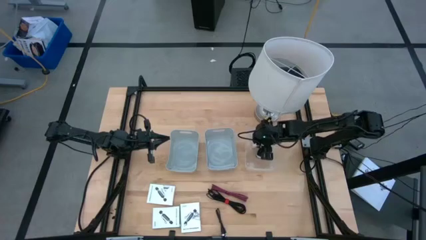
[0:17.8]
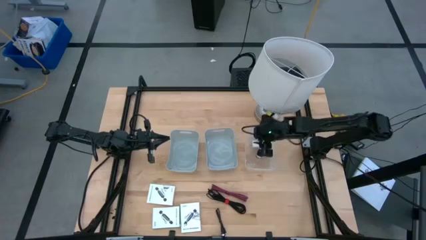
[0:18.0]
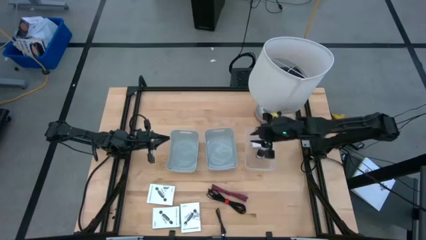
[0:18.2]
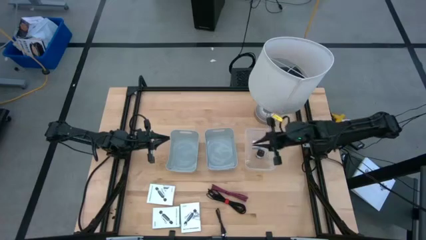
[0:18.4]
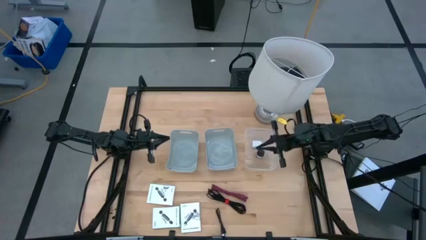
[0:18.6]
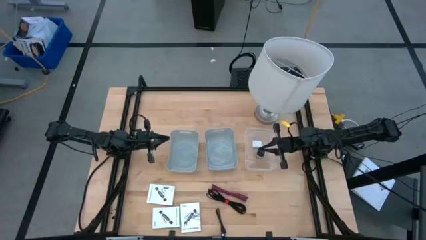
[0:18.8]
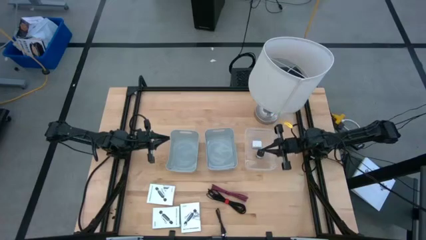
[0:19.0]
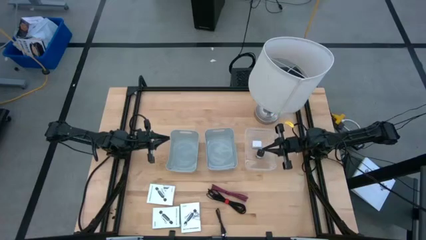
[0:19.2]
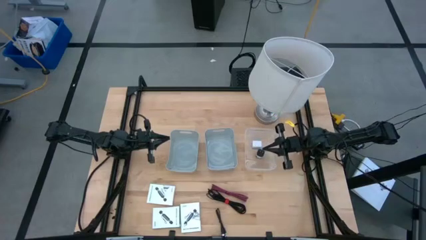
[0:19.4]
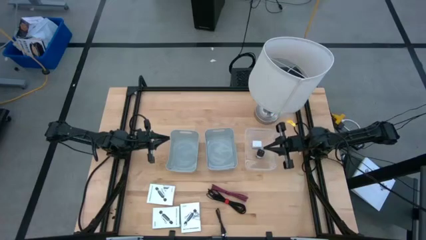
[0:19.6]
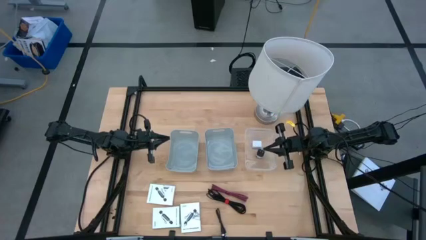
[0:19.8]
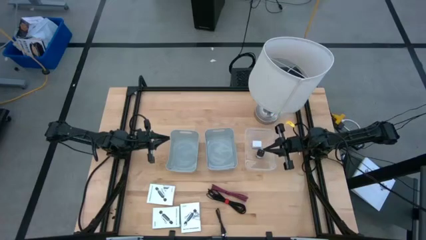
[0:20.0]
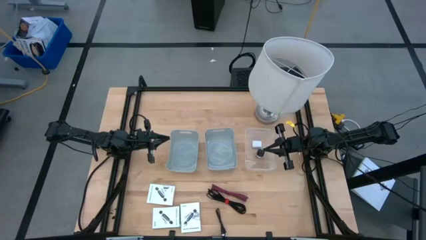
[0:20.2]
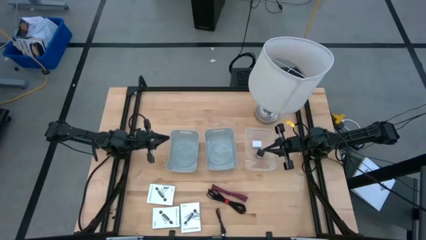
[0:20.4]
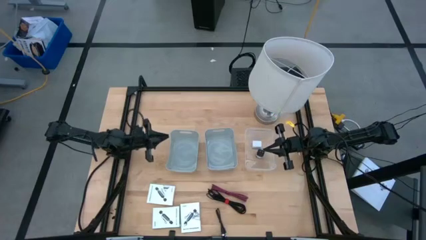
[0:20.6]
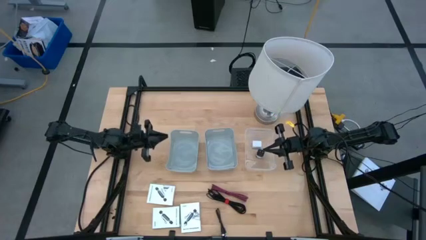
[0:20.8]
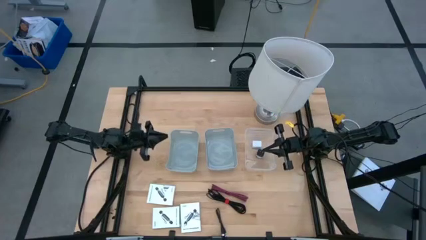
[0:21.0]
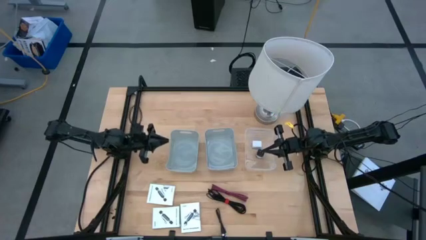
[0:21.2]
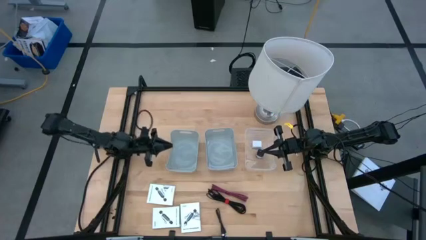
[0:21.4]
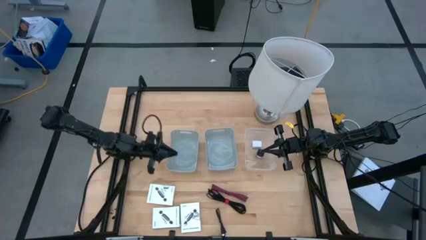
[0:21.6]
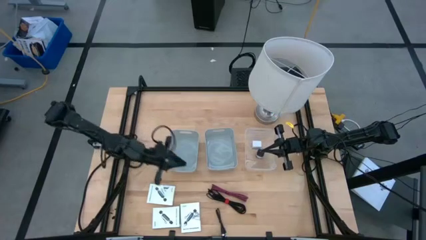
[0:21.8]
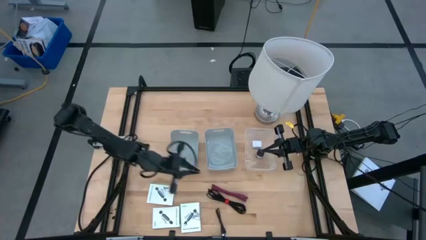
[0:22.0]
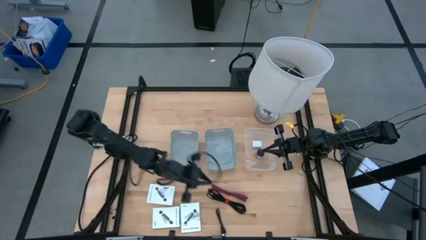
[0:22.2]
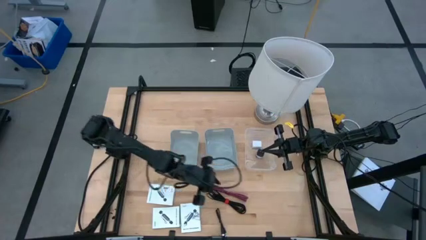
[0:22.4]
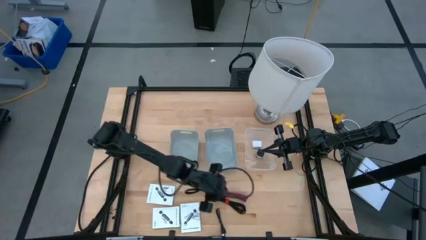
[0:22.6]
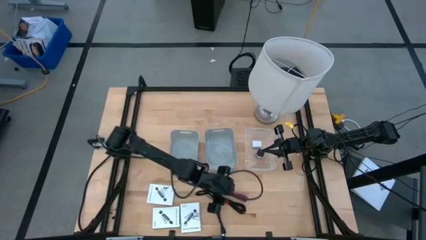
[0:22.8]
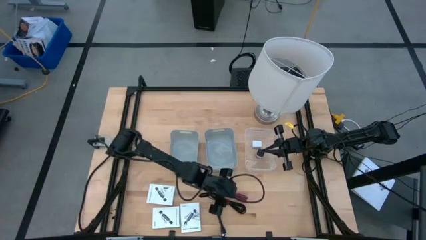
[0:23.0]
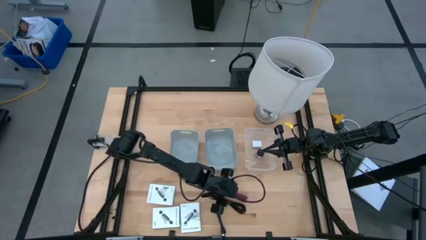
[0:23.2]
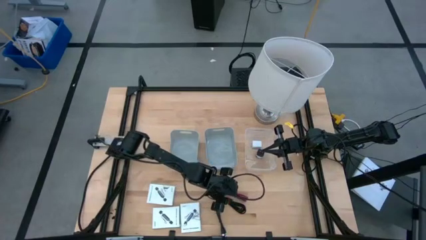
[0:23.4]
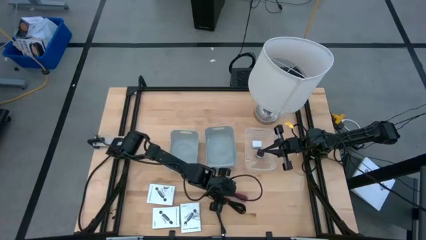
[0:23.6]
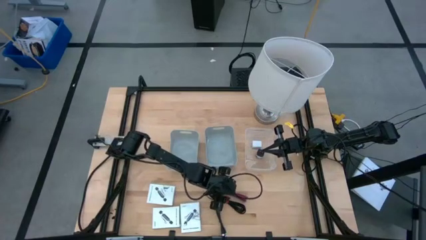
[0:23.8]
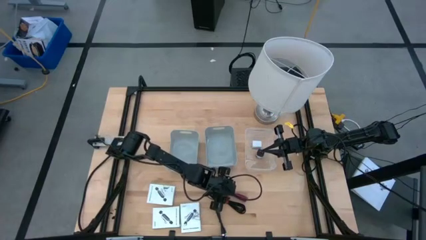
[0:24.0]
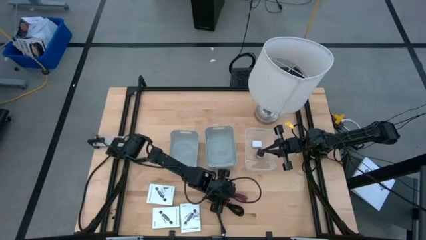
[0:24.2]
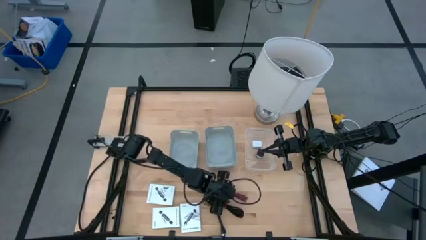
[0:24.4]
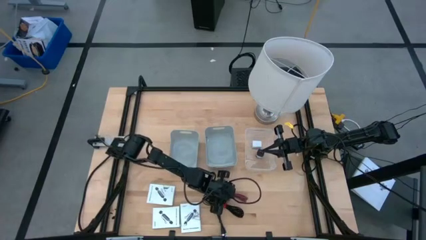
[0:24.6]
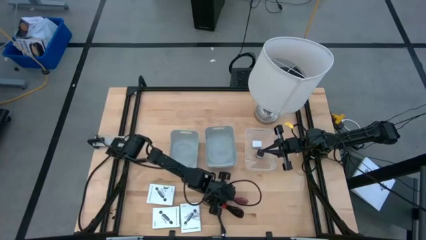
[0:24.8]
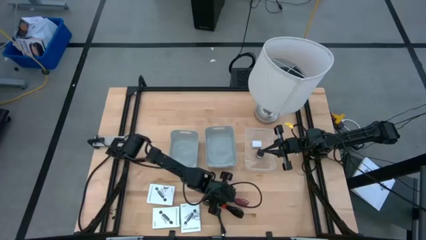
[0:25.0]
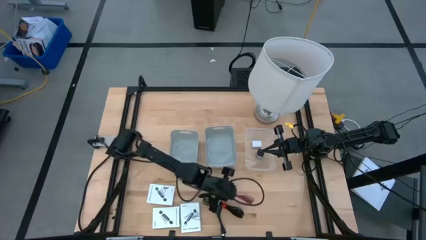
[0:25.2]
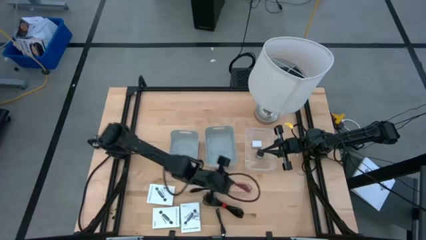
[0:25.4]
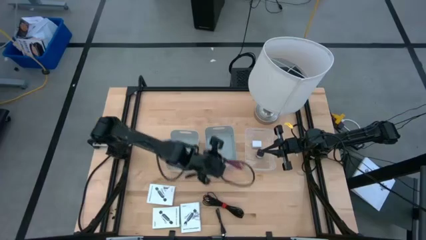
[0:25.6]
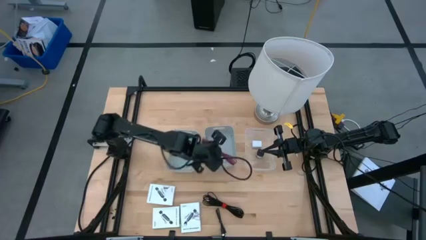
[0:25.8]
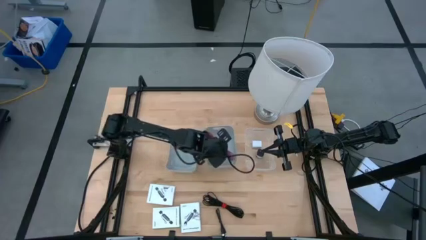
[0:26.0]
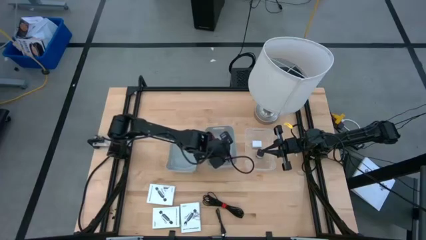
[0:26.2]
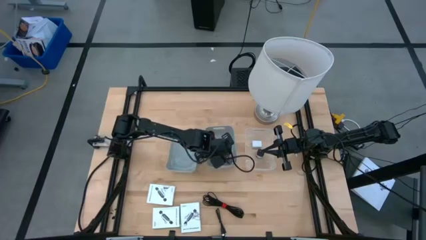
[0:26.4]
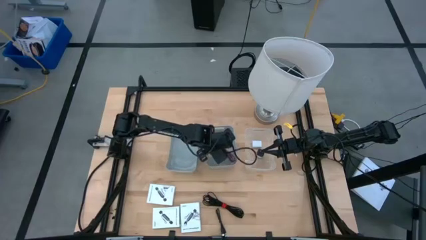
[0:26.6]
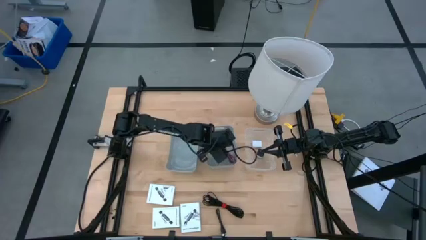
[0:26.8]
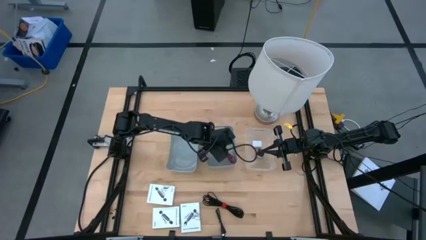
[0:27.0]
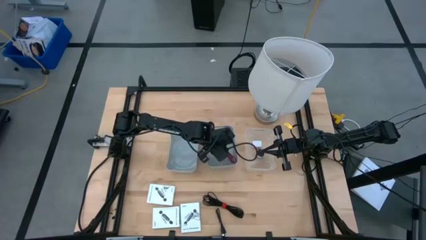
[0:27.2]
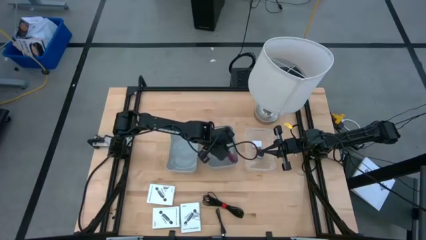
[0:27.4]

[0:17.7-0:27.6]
Task: Pick and place items into bin
Put the pink charger cable into the right gray bin

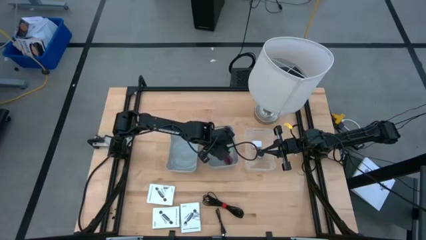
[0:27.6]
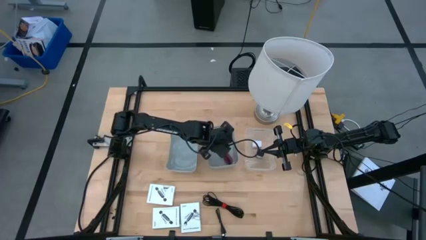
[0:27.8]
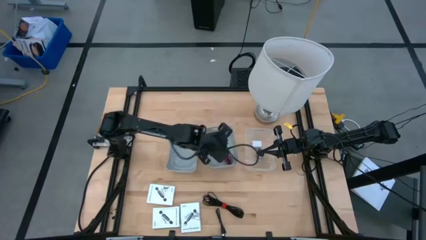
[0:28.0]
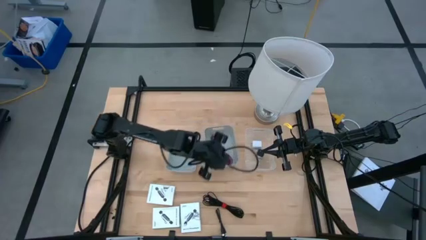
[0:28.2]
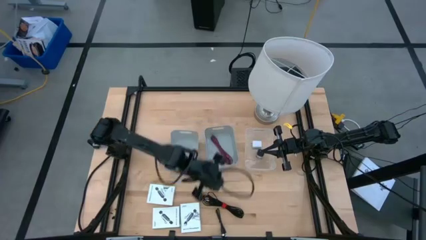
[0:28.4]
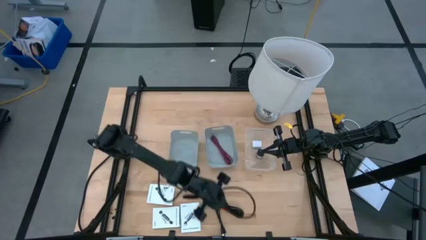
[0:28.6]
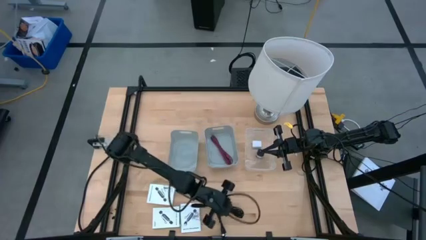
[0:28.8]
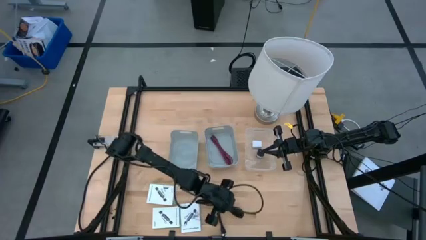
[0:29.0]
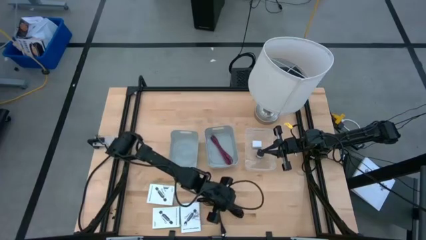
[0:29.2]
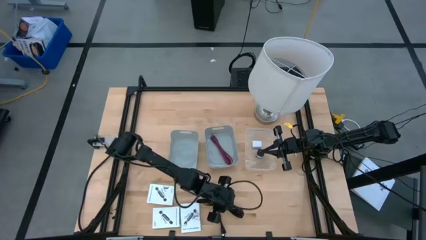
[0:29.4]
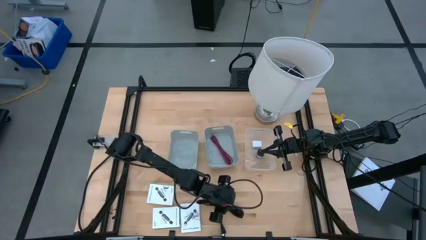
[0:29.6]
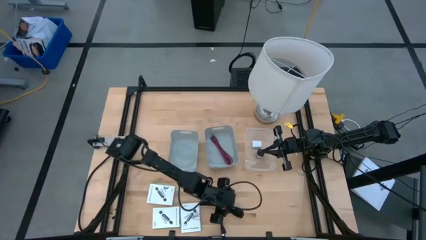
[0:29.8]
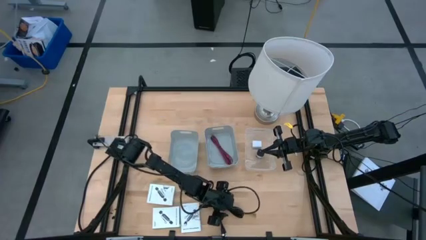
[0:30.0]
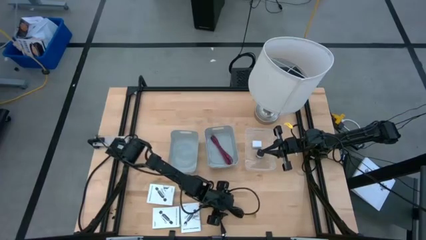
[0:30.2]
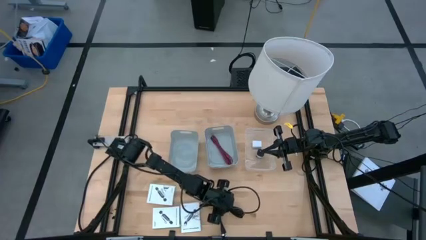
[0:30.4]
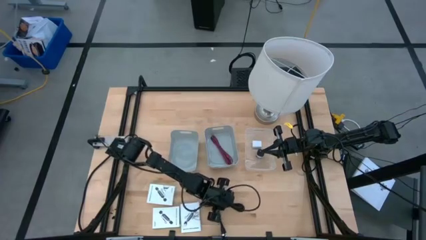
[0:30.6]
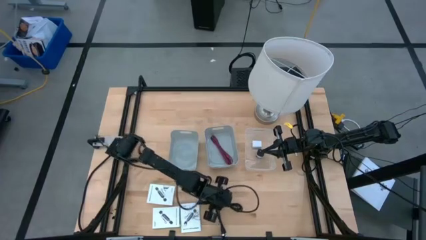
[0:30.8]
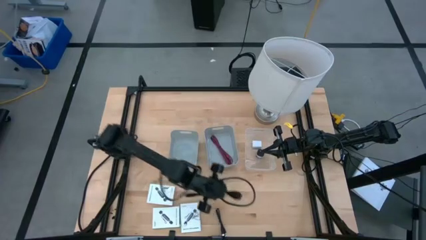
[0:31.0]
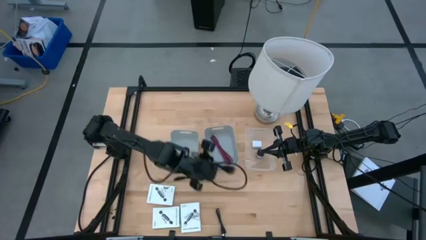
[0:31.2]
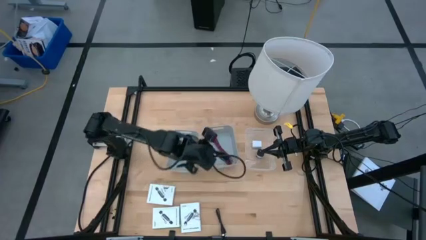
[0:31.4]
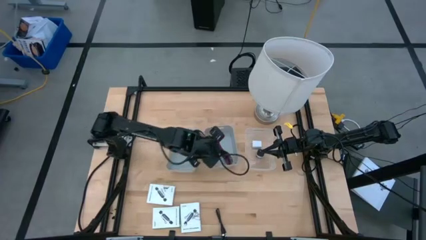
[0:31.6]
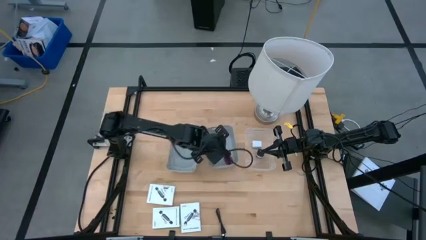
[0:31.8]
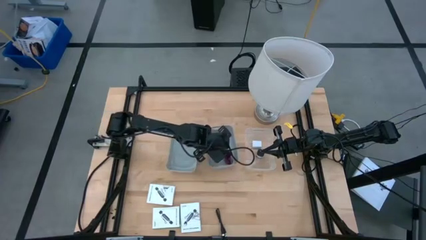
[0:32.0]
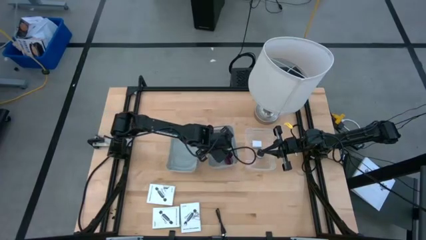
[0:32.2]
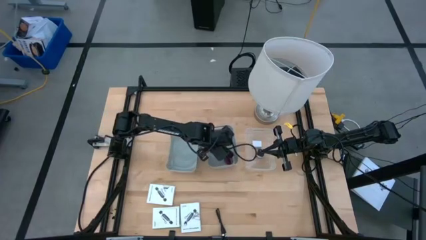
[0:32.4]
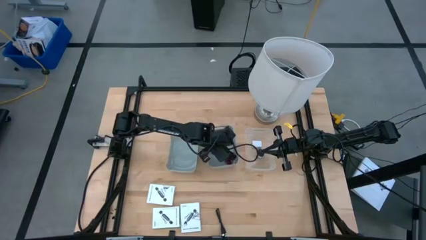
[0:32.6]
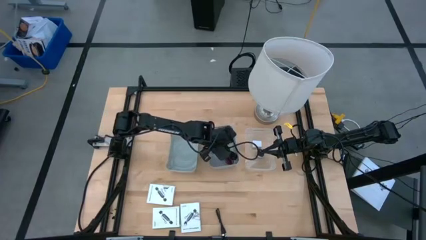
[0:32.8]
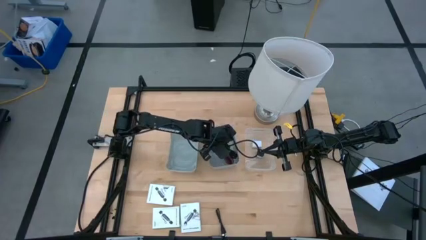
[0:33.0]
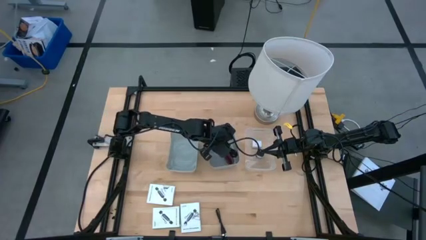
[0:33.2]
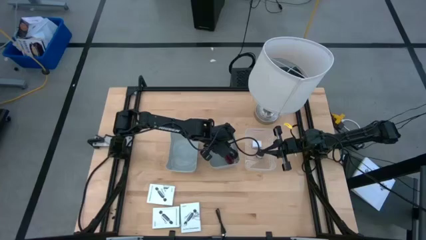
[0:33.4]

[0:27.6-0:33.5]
Put the top black charger cable into the right gray bin

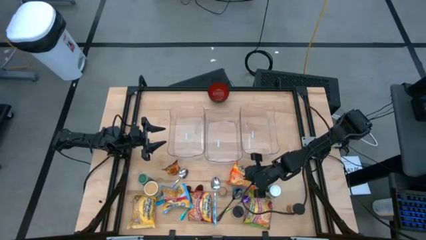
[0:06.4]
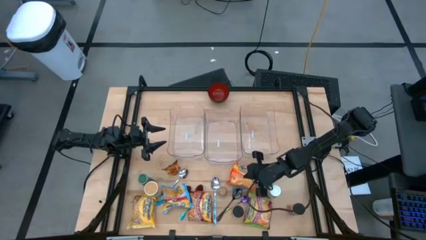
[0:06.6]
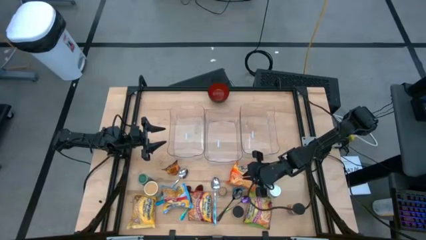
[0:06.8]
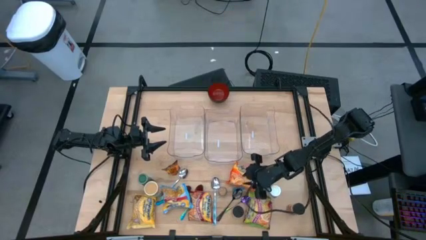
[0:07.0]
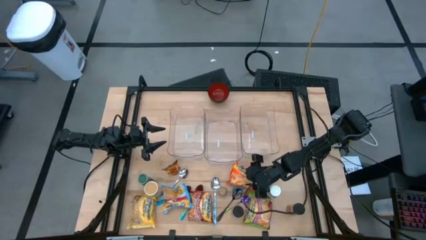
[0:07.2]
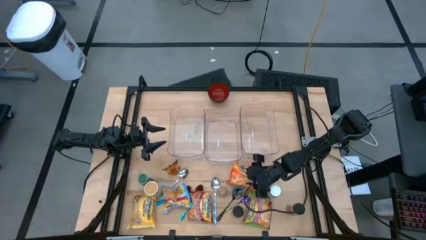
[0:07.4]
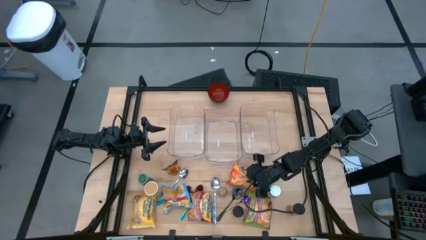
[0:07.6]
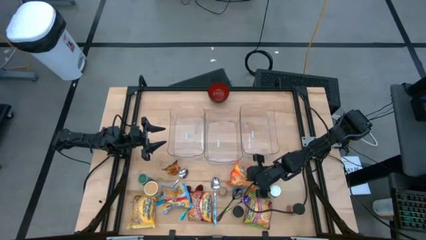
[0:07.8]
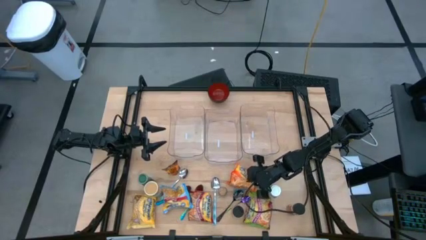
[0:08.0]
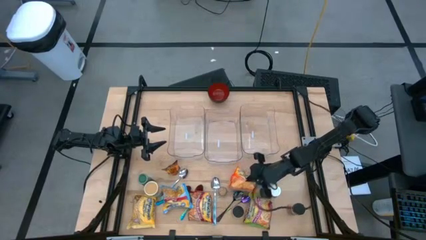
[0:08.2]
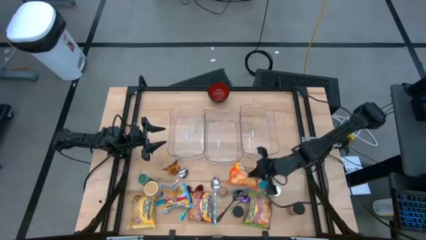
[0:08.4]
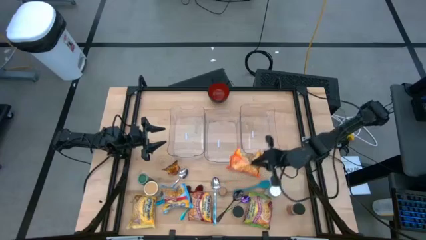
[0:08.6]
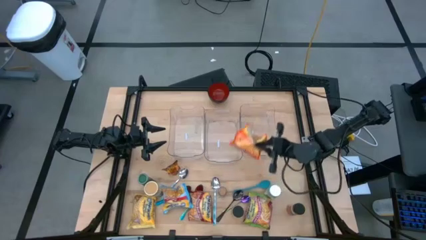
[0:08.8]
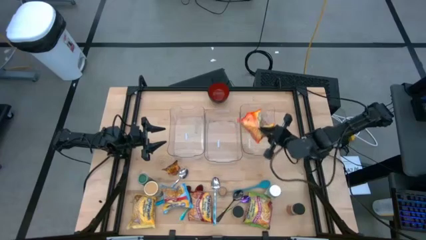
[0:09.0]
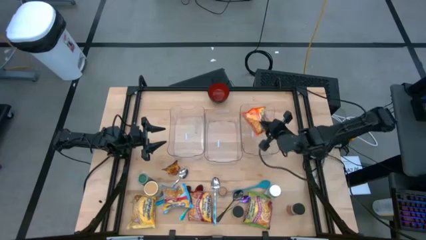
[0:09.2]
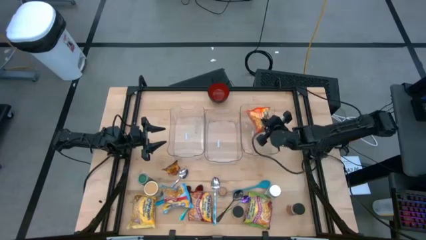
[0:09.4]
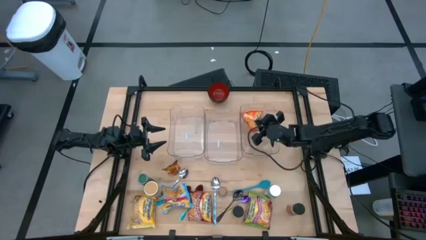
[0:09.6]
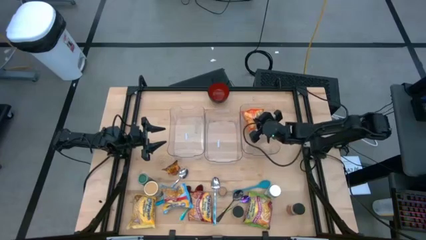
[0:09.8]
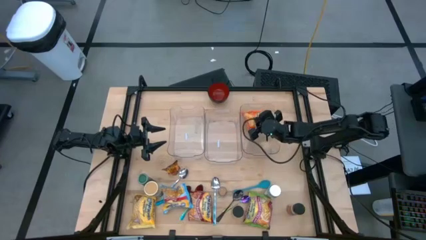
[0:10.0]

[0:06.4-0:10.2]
Task: Pick & Place Food Item
Put the orange noodle pack into the right transparent bin
